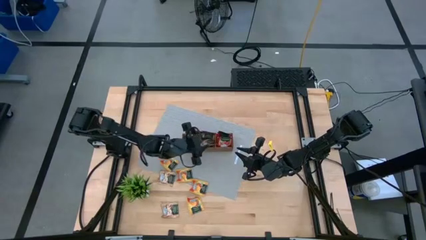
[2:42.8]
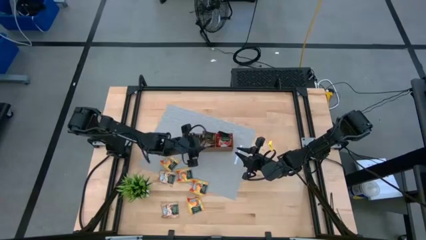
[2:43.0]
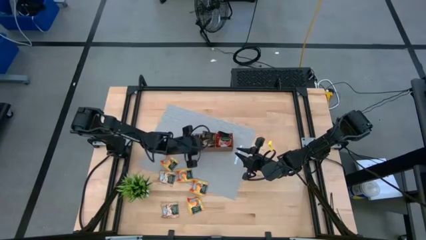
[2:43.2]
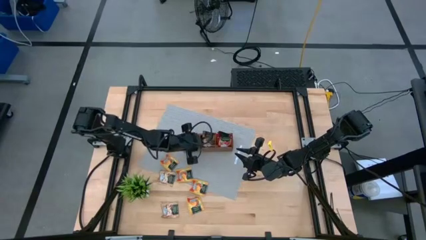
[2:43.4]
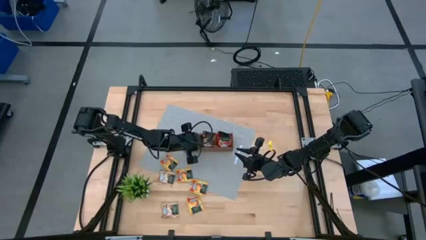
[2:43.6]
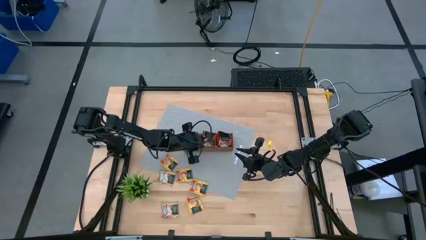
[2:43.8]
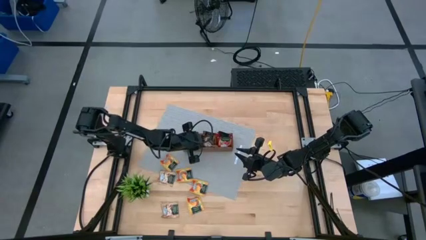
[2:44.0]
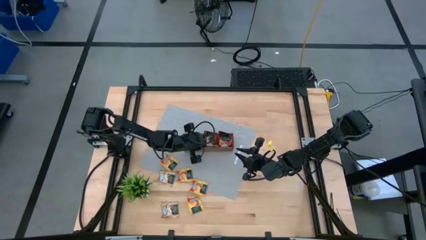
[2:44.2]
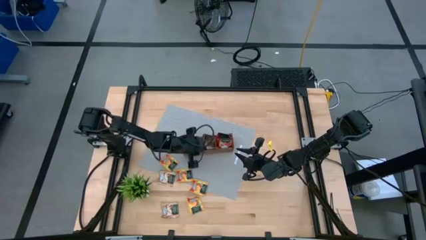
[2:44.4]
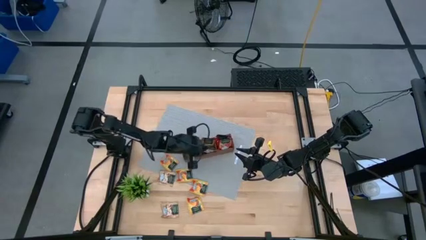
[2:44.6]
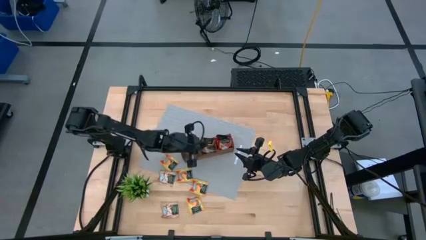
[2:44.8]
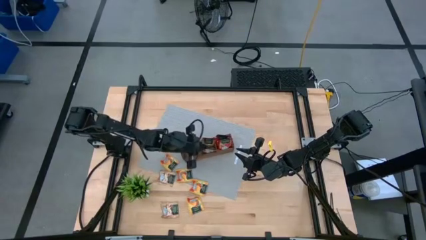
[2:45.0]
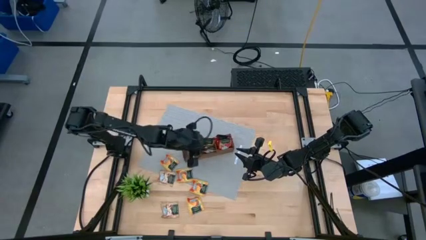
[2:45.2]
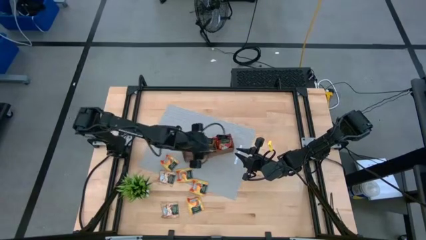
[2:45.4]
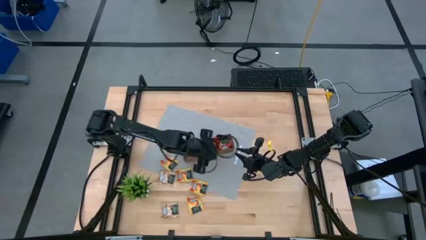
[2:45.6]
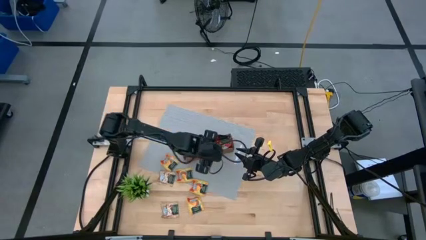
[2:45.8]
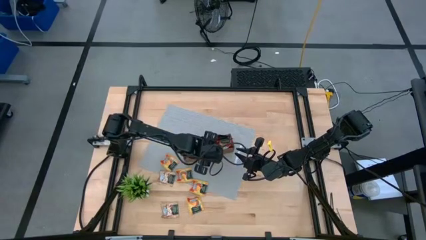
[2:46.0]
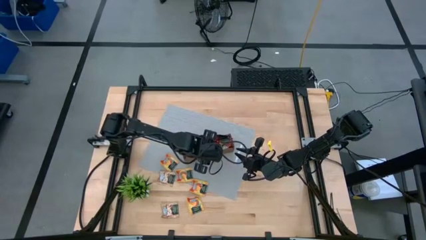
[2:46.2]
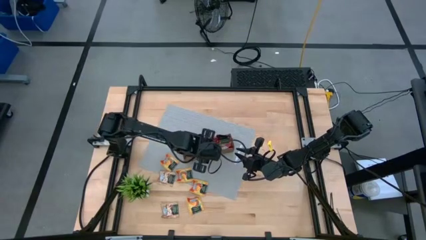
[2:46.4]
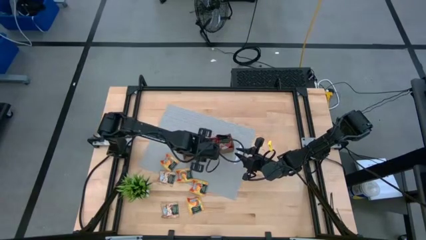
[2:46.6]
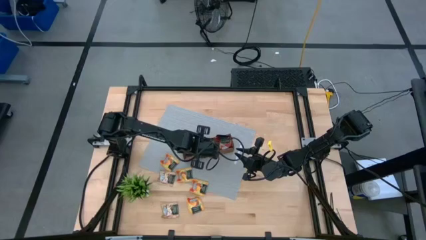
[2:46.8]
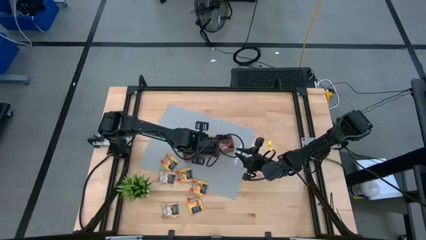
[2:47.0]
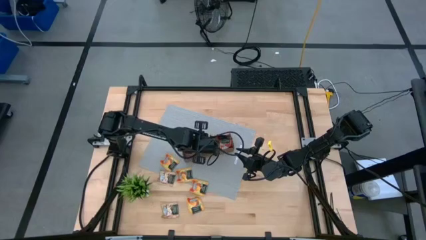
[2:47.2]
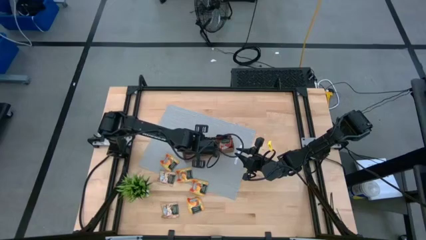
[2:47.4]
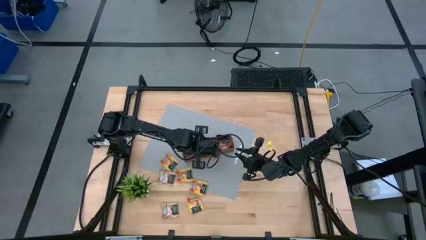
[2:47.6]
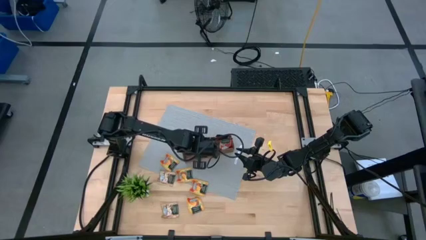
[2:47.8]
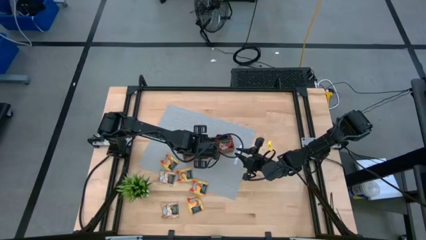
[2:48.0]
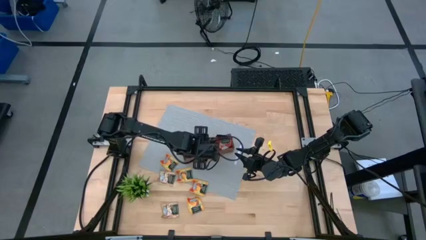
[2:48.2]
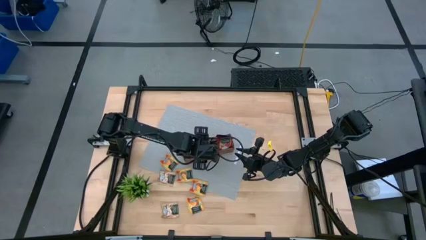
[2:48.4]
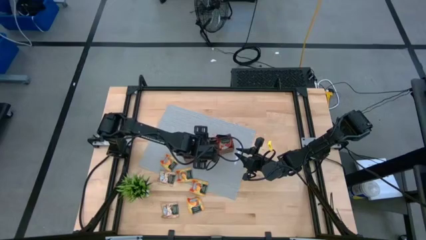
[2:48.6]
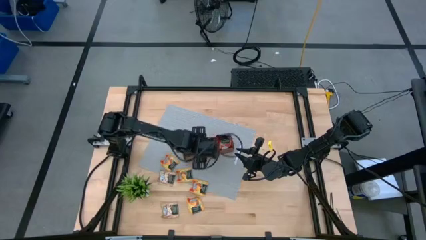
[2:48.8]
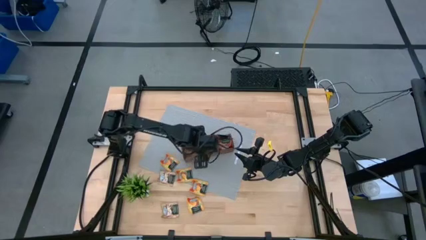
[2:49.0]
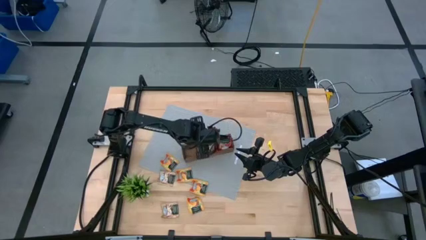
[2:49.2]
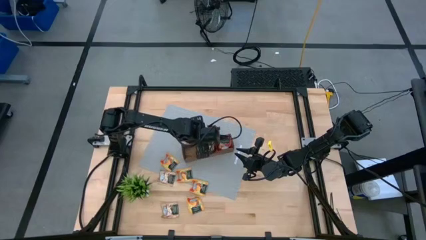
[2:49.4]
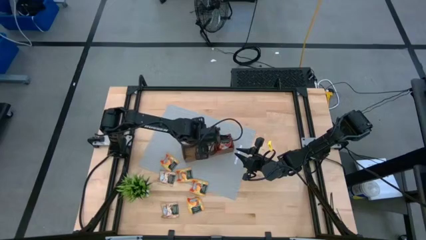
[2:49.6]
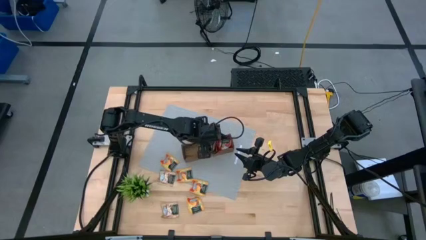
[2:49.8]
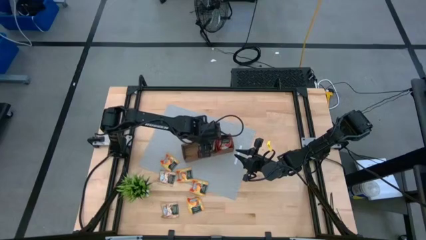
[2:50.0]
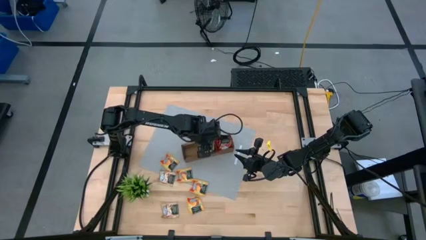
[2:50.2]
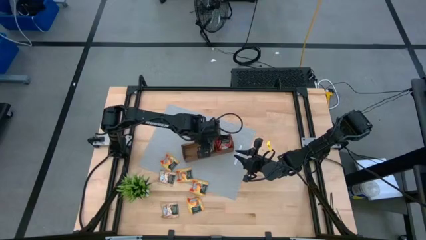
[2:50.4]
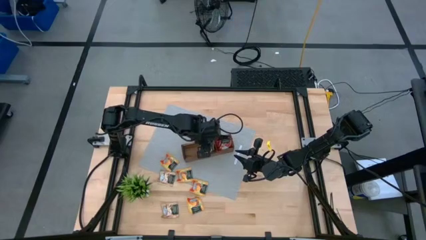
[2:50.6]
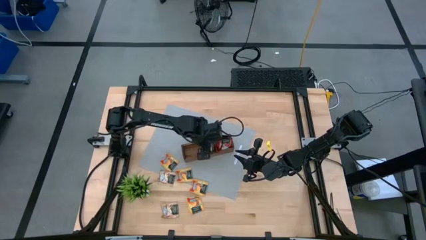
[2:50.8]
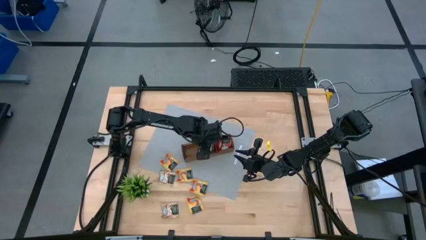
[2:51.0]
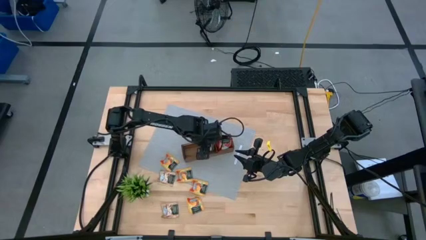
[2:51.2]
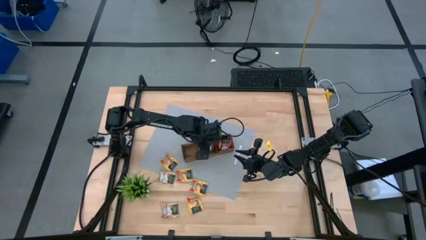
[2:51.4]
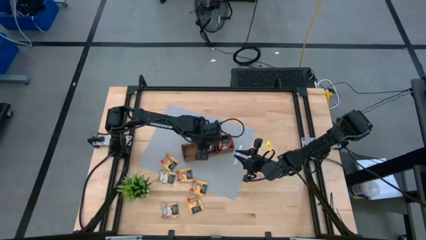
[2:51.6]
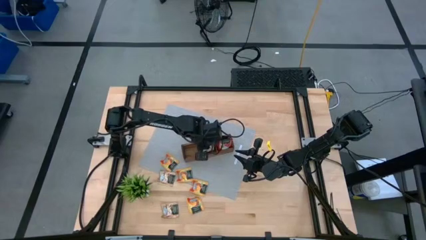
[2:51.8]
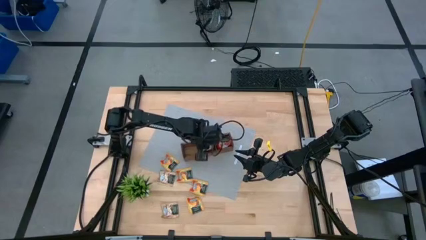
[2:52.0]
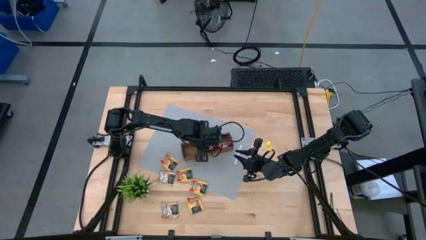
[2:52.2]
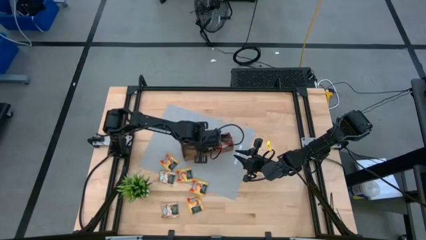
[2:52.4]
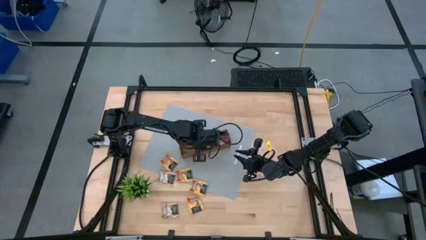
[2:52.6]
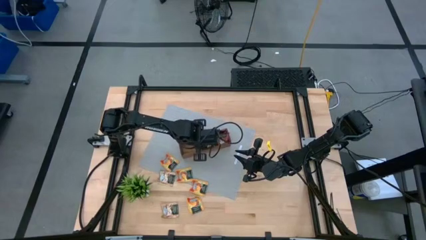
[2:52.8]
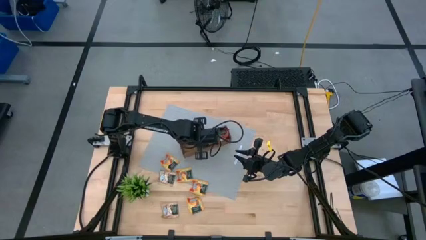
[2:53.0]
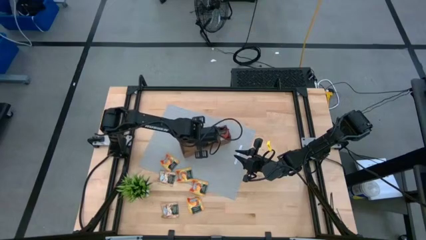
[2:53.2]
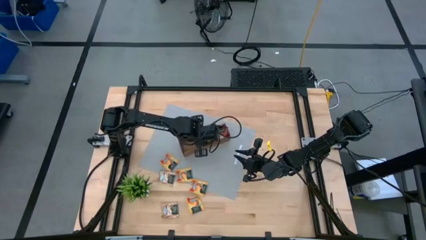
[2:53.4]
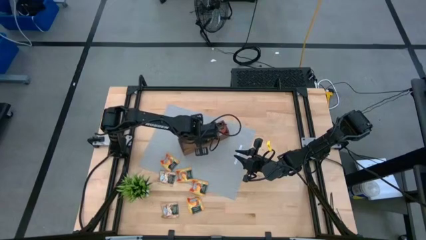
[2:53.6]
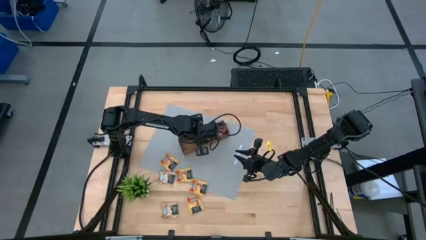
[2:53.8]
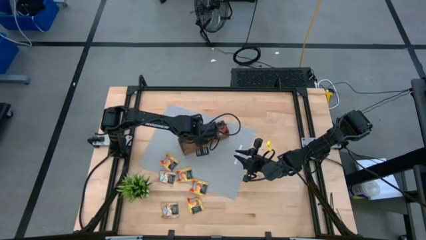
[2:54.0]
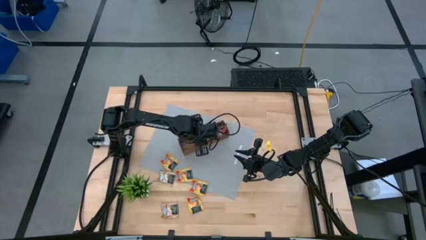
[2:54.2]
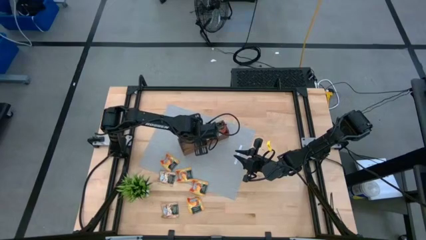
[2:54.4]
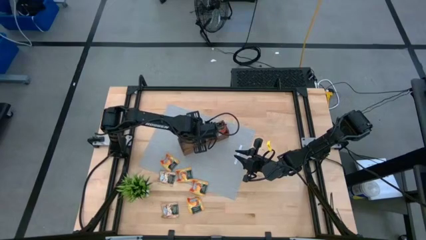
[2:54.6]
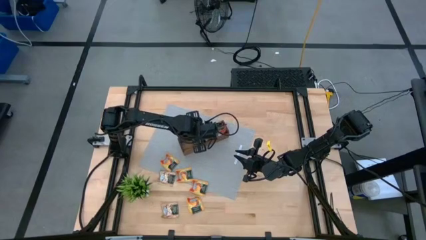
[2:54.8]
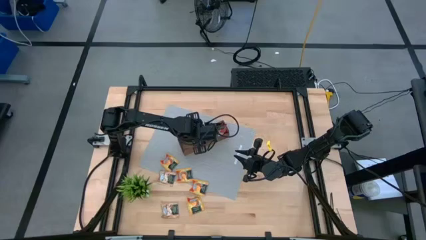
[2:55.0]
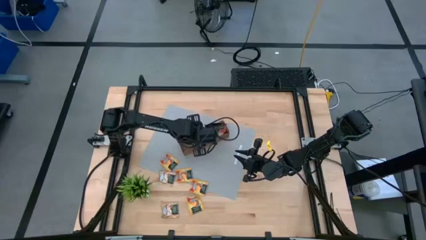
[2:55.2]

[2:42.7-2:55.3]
Task: Pick & Place Tea
Put the brown tea bag into the wooden organizer

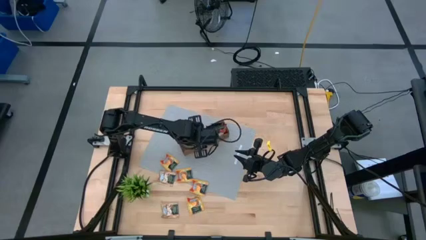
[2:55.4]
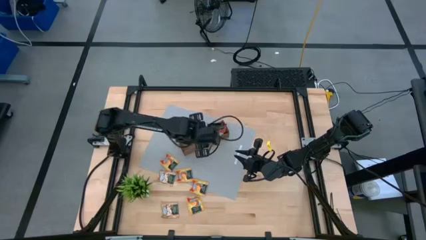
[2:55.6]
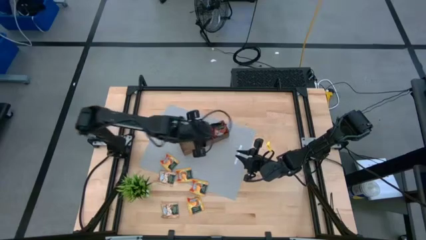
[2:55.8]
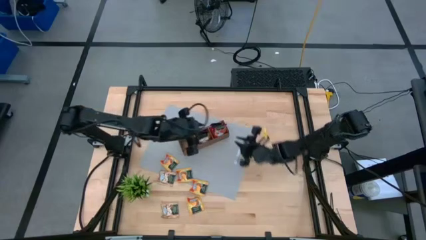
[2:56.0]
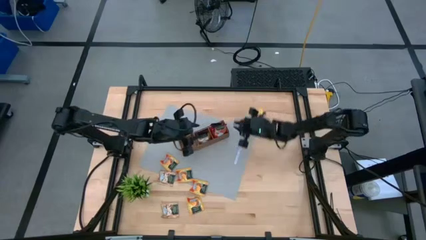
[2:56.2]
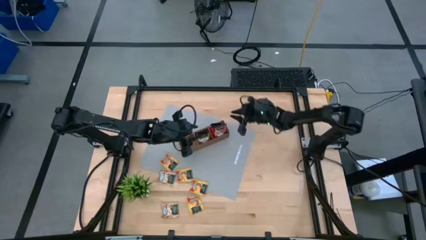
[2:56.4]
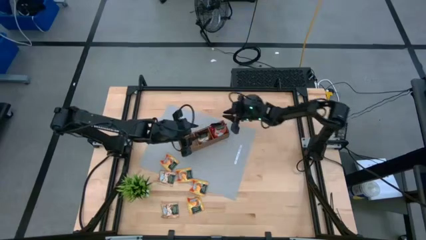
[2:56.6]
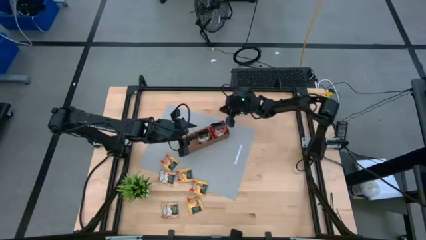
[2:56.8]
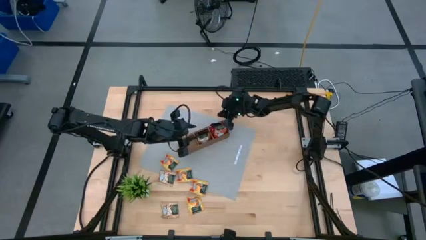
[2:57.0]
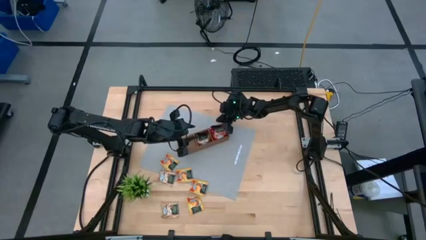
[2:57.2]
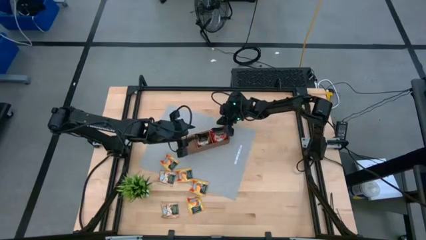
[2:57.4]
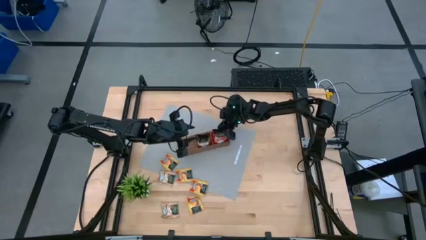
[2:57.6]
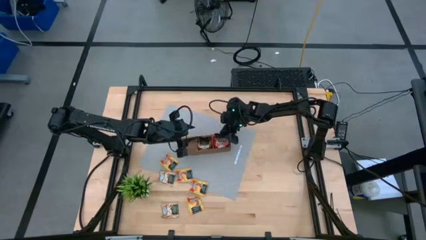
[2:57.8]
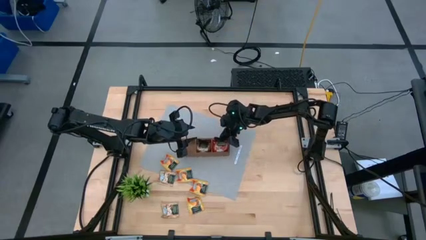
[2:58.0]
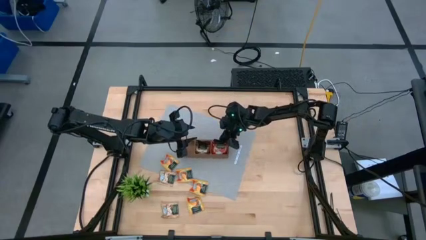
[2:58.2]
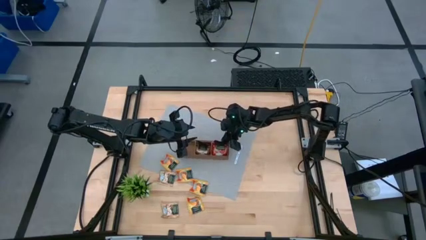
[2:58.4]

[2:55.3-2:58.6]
Adjust the wooden organizer
